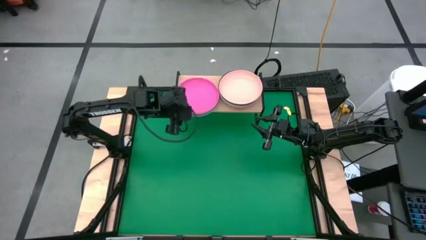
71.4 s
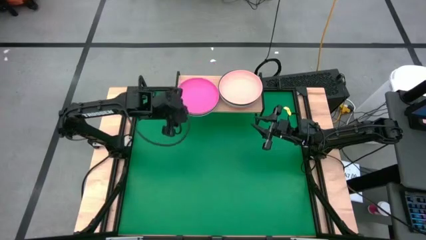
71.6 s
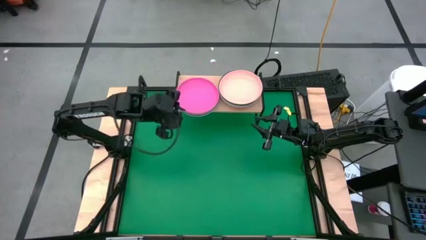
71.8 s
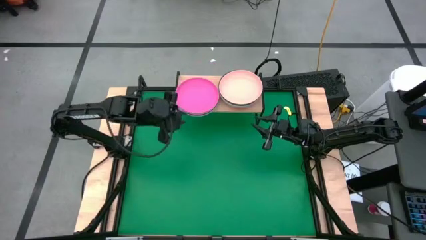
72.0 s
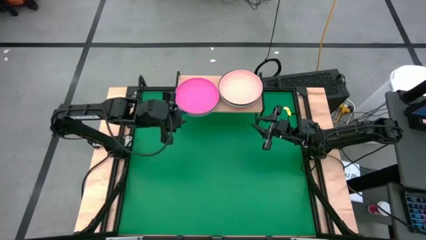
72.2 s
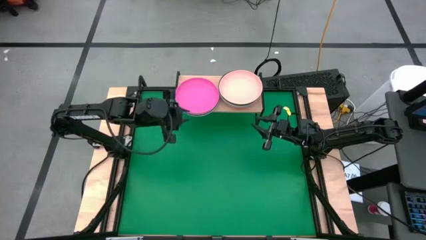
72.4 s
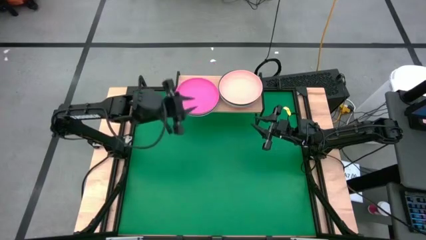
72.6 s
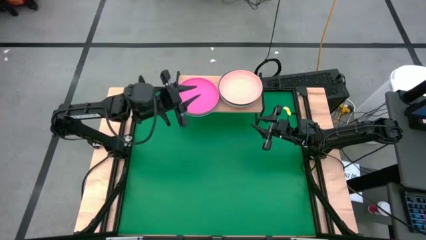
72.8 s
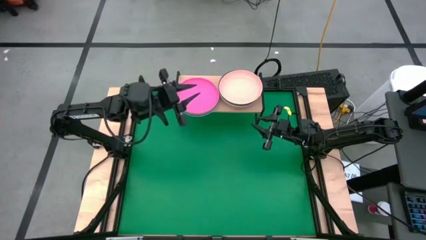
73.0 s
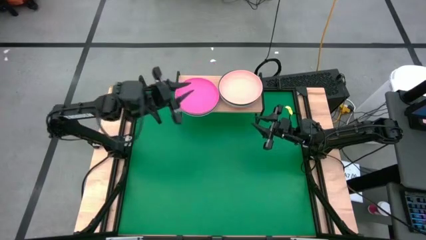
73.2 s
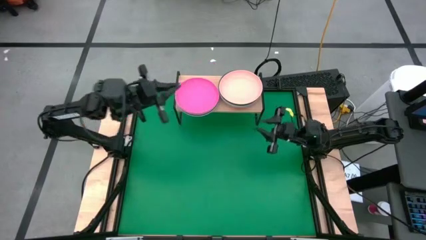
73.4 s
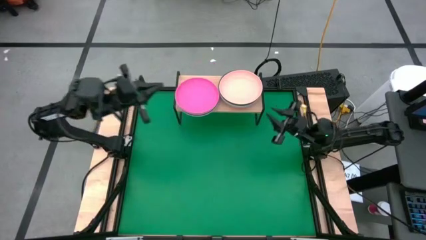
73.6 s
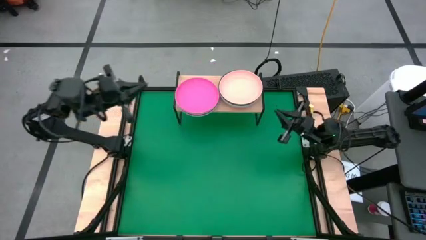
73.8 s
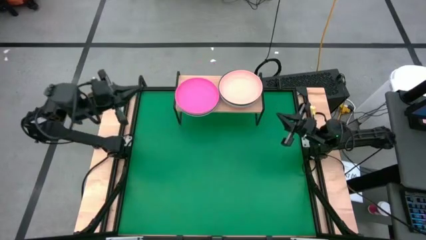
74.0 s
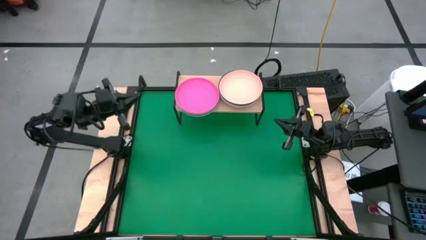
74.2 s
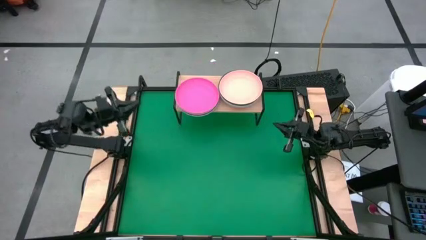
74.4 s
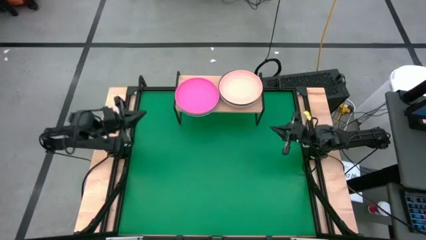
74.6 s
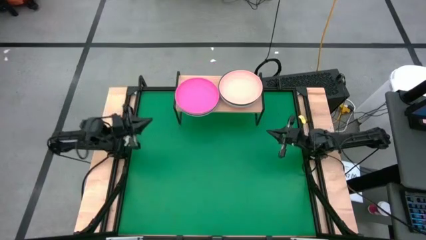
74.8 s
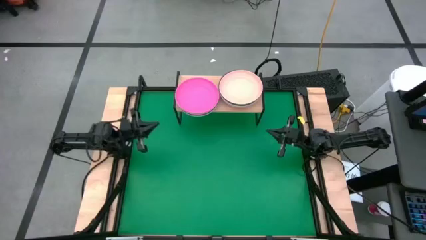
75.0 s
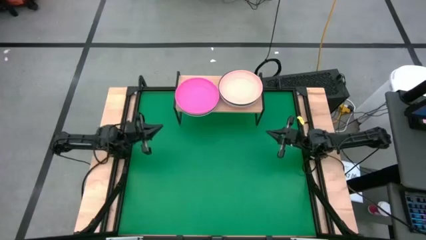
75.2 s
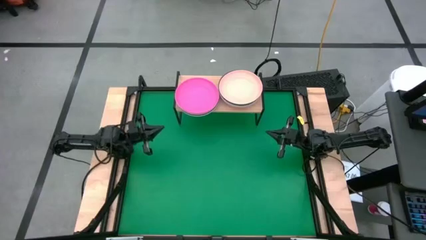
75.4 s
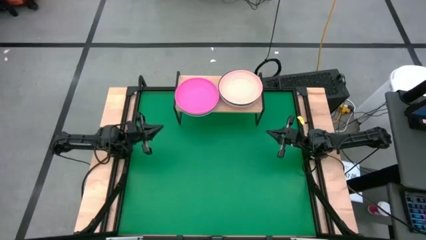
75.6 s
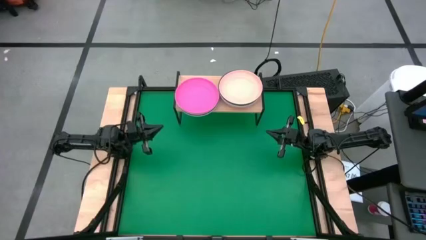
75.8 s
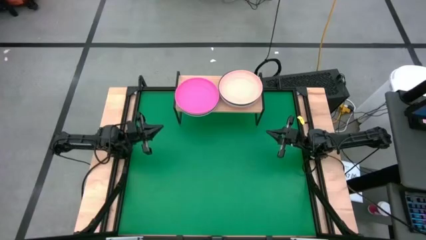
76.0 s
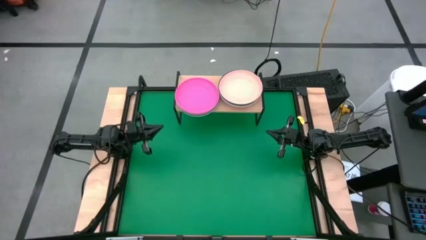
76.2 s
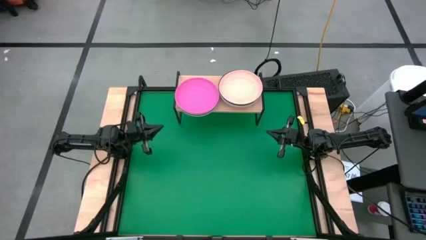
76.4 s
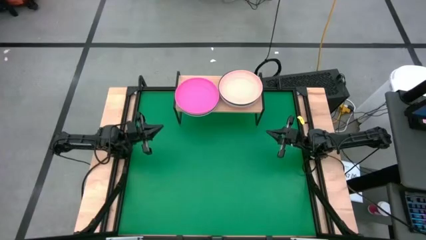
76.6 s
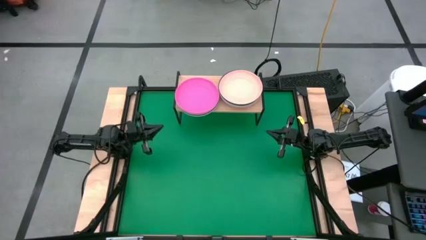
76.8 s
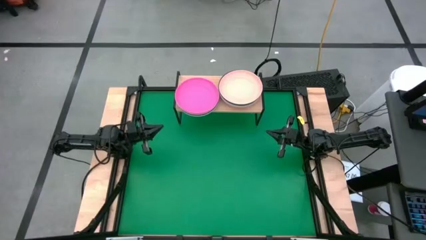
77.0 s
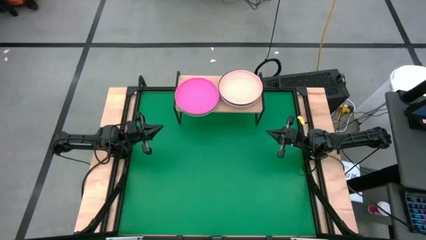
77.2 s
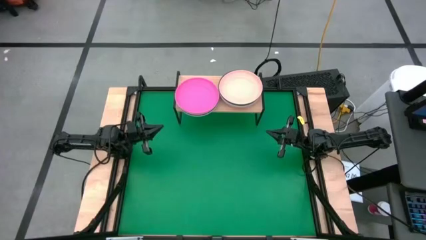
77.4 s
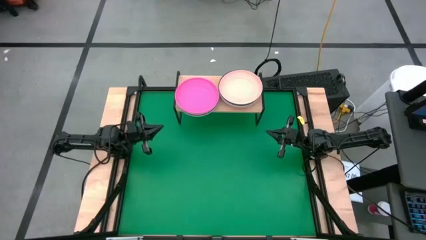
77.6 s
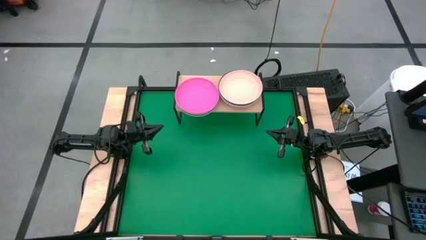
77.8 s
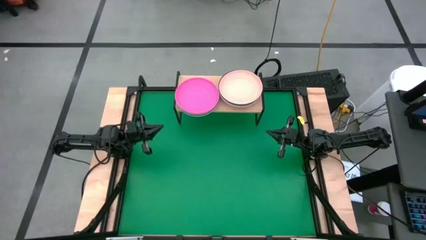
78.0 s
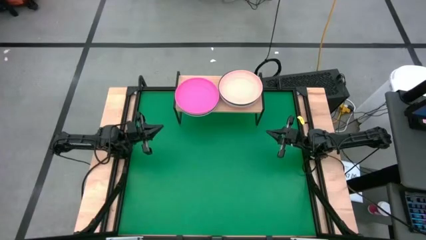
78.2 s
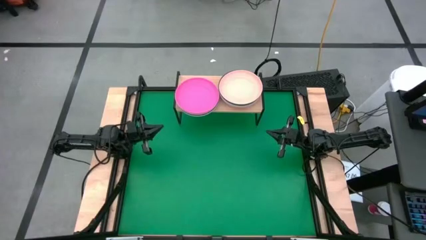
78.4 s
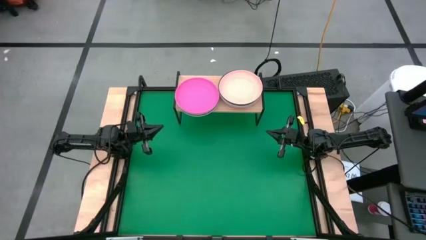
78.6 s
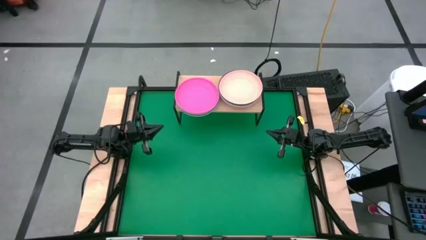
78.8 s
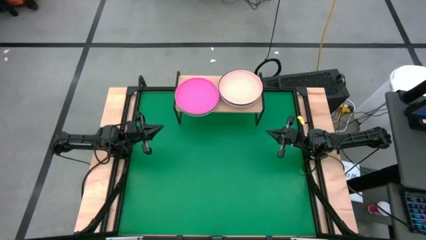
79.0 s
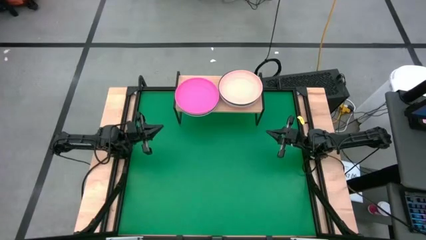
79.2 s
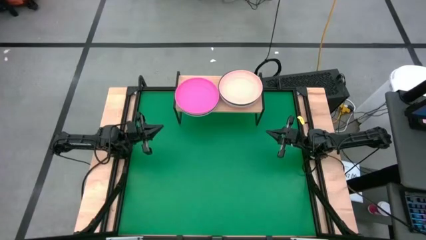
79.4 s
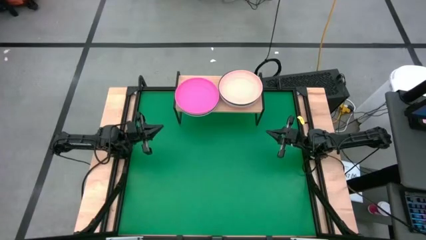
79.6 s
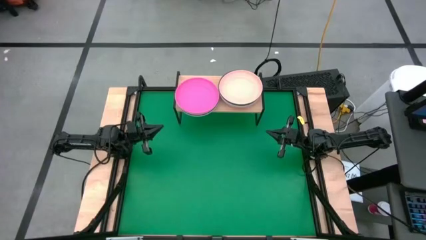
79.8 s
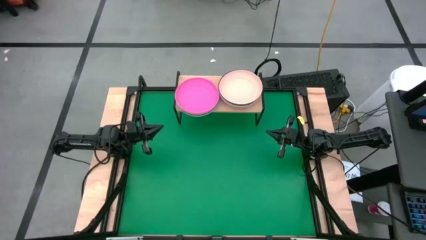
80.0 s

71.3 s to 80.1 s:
Task: Place and stack plates onto a shelf
Return to Home Position

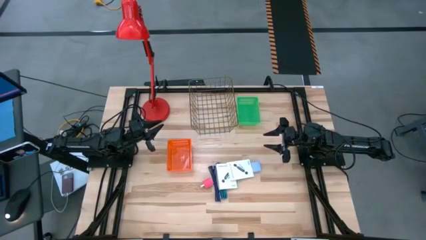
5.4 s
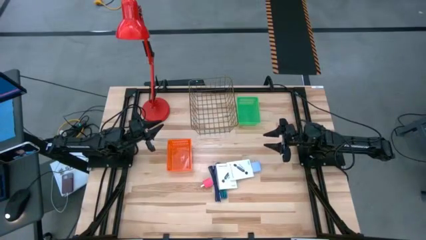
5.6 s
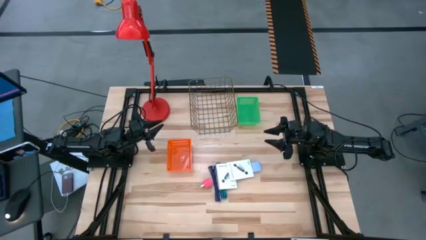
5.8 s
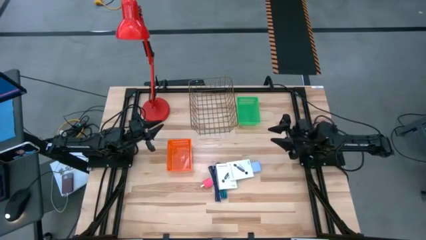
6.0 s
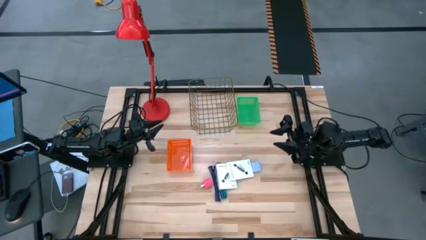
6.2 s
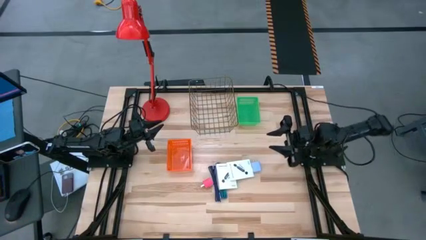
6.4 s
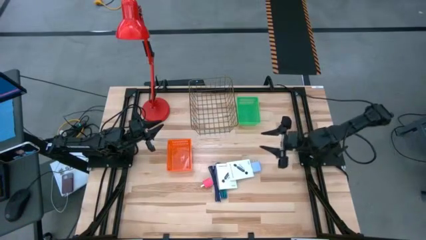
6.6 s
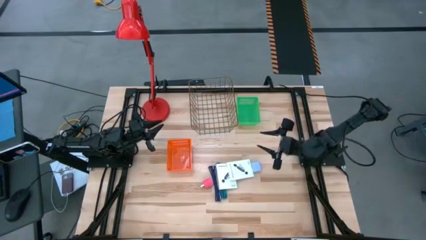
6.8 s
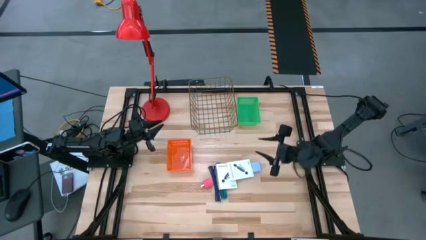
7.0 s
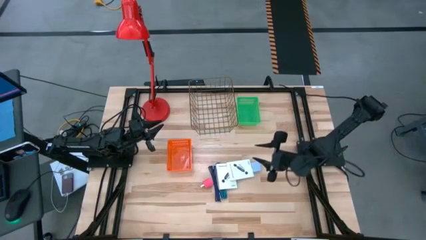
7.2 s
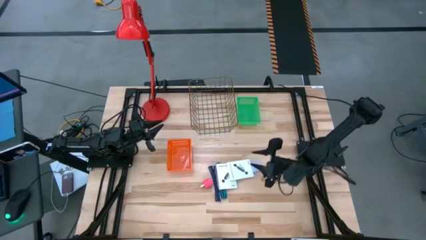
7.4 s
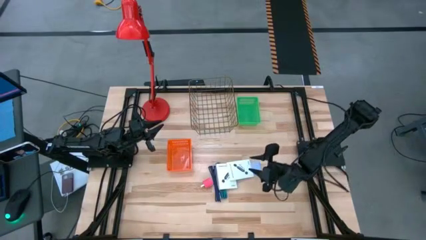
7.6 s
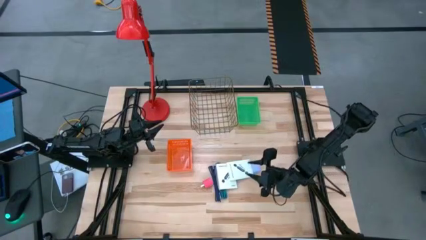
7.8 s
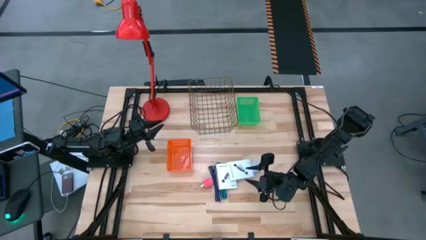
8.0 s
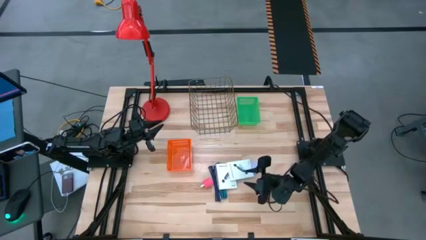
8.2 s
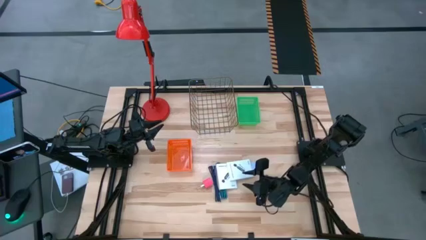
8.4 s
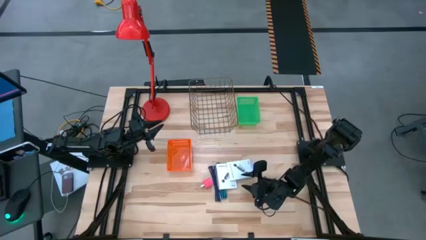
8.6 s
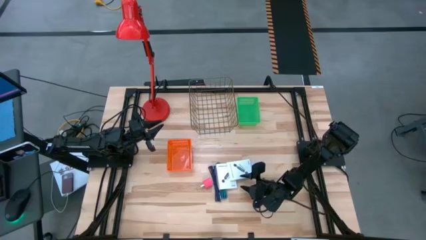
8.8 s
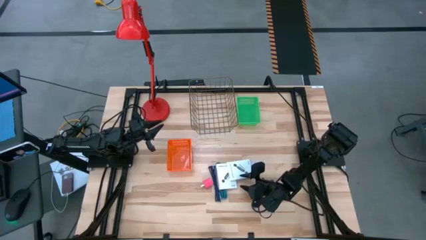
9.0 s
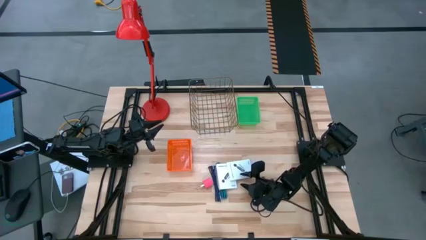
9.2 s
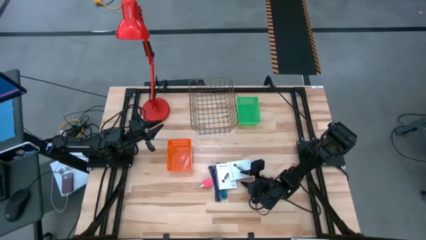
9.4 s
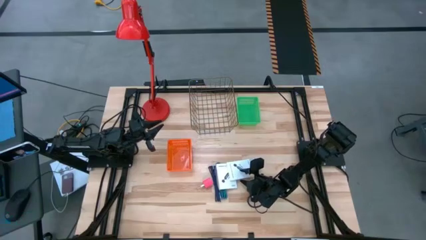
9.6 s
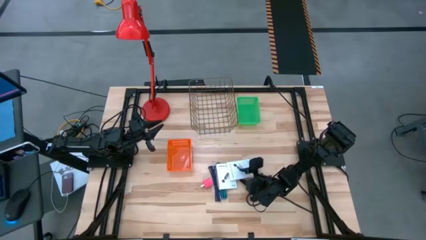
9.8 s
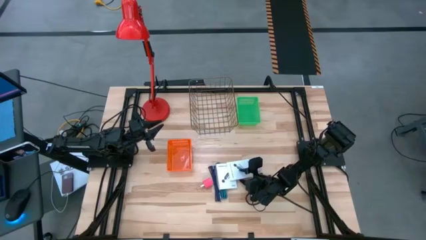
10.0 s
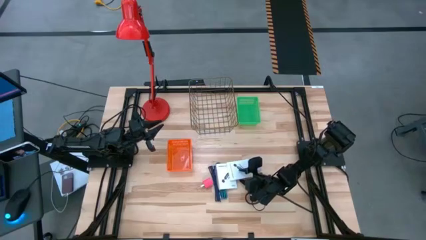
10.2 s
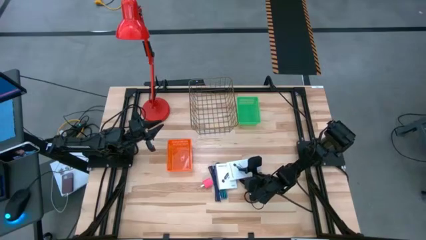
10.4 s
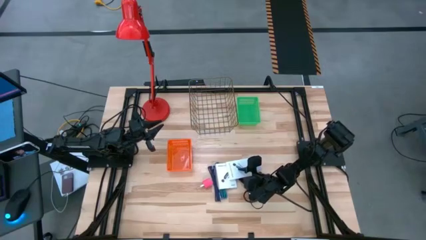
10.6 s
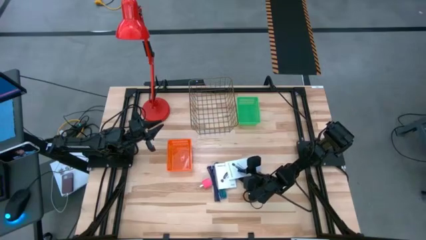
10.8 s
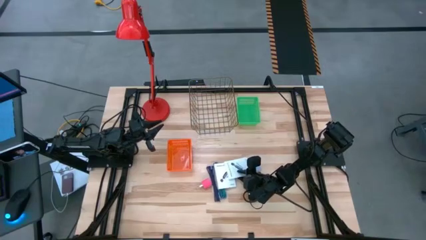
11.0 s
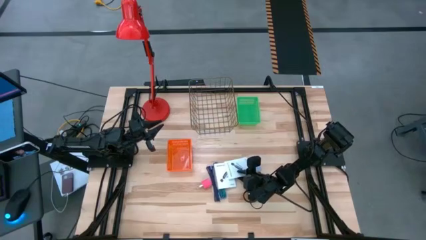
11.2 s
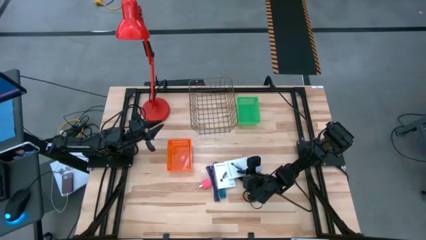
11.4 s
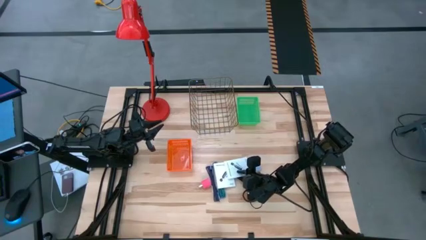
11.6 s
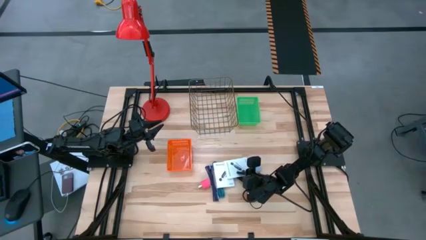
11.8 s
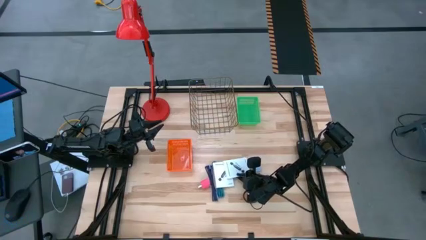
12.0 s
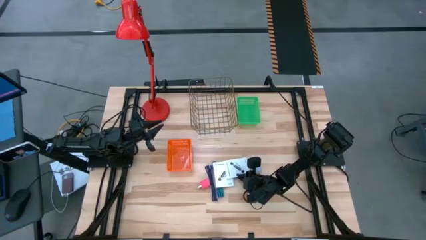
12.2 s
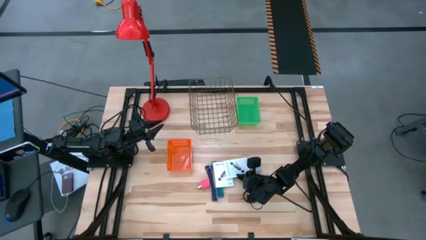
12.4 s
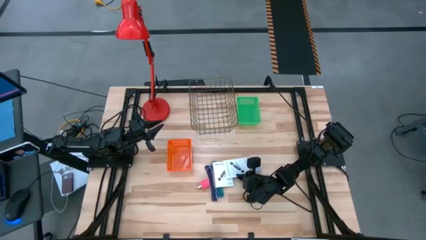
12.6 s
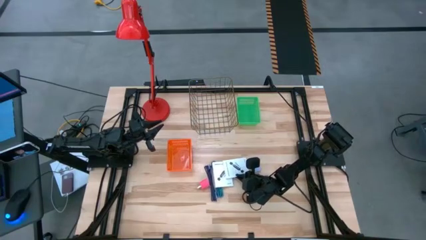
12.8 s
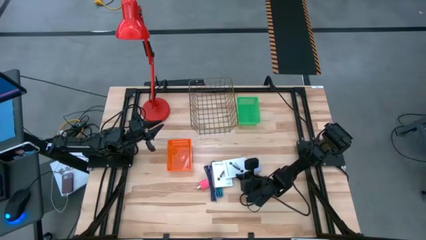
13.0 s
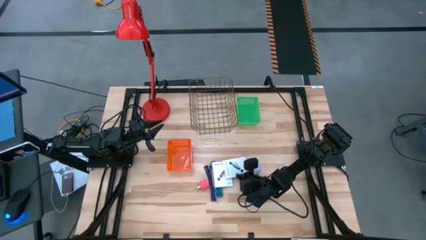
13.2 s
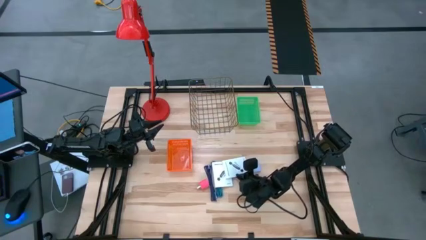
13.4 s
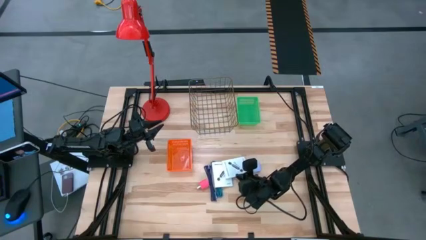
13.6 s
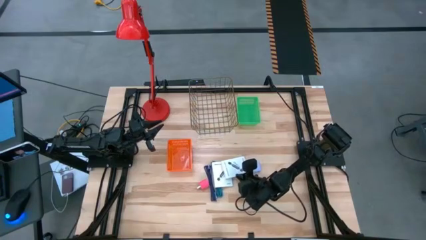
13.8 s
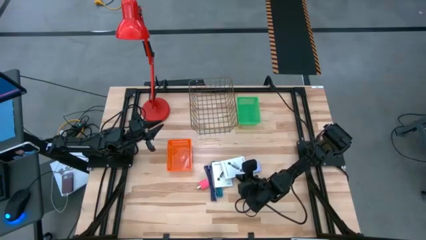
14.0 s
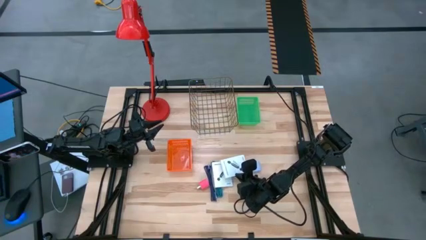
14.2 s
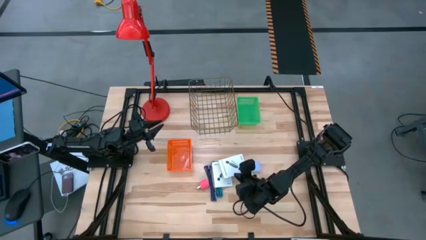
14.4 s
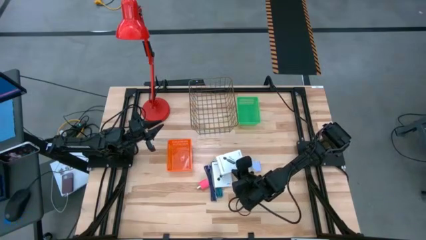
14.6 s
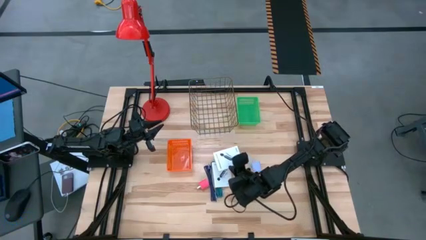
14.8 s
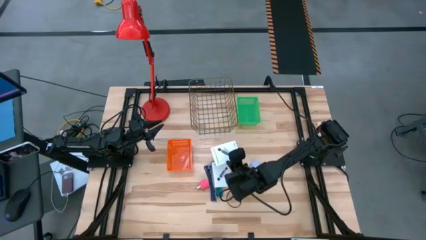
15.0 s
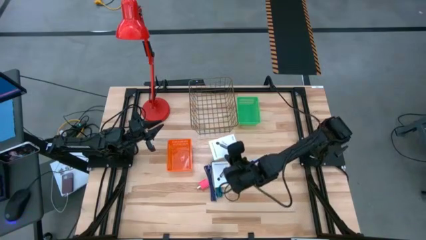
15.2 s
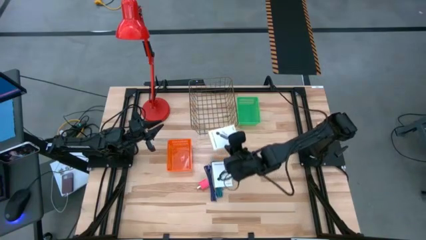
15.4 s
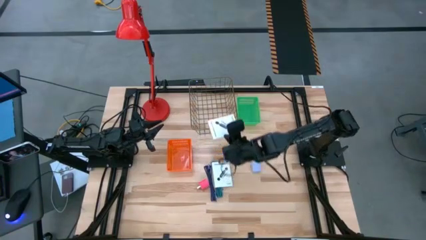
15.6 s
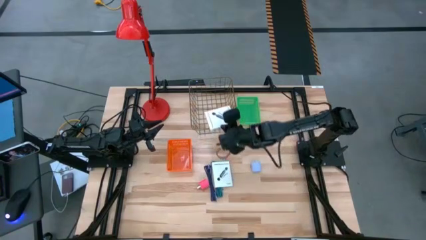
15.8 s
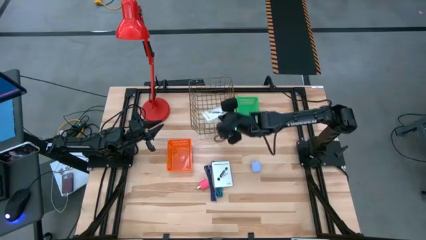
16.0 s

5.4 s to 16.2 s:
Task: Pick and place items into bin
Put the right card reader box into the wire basket
